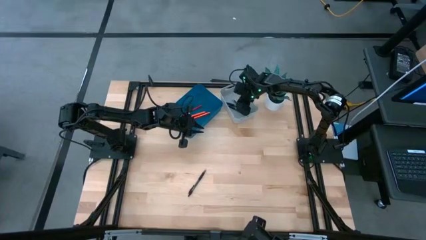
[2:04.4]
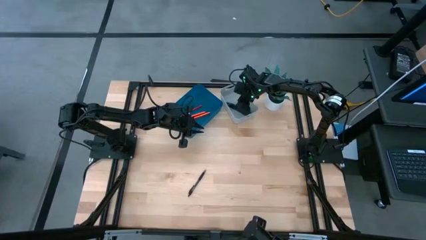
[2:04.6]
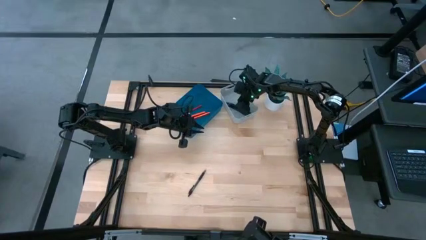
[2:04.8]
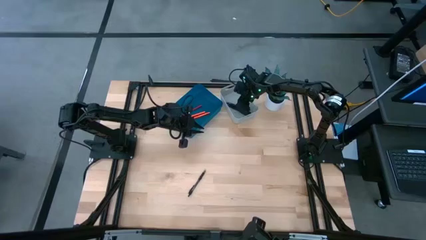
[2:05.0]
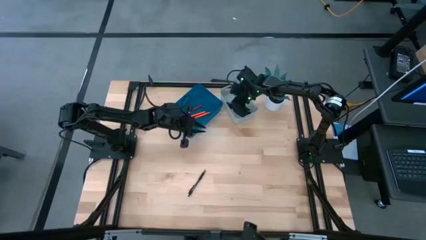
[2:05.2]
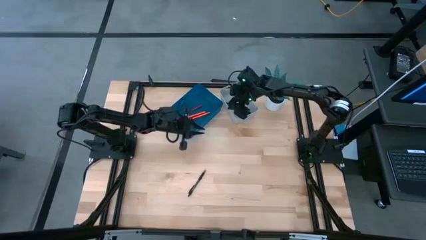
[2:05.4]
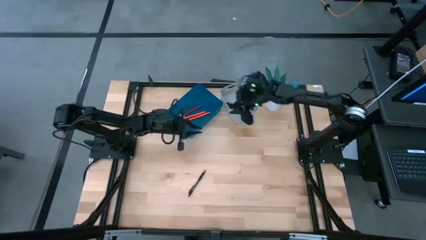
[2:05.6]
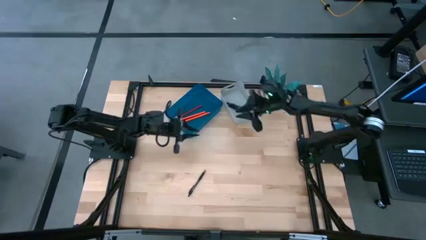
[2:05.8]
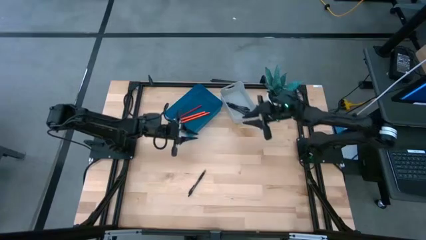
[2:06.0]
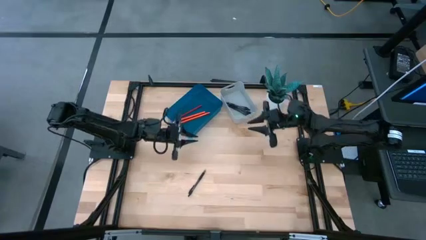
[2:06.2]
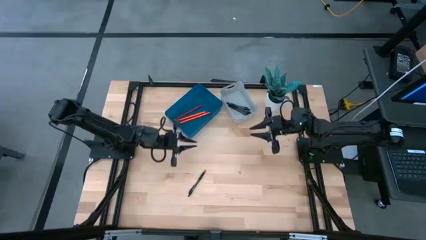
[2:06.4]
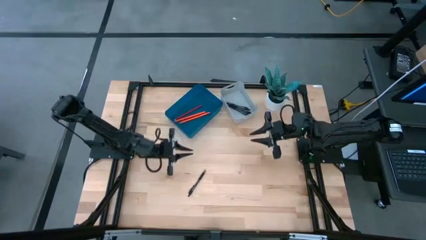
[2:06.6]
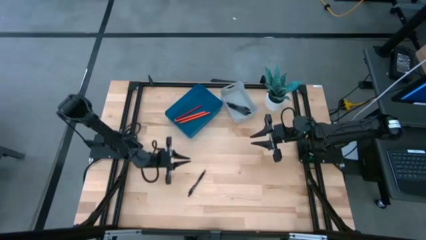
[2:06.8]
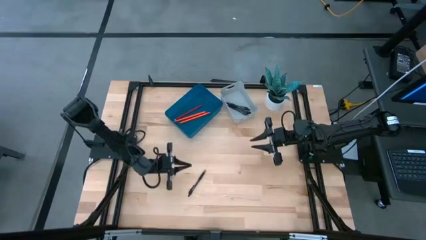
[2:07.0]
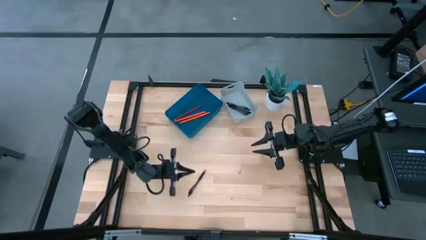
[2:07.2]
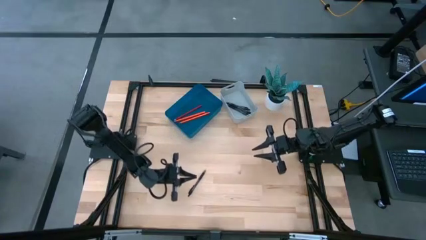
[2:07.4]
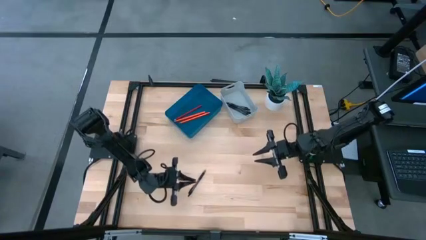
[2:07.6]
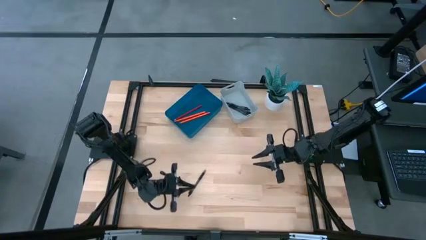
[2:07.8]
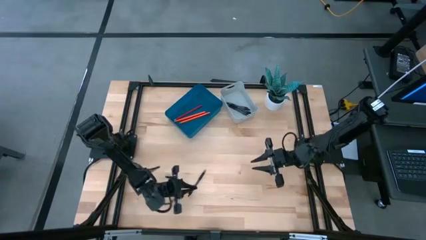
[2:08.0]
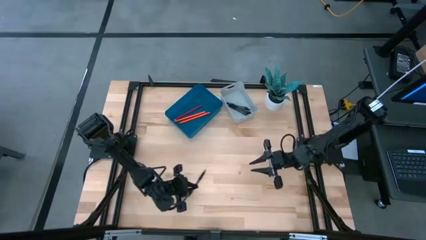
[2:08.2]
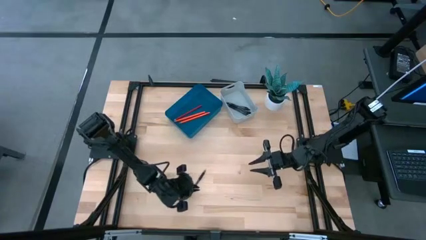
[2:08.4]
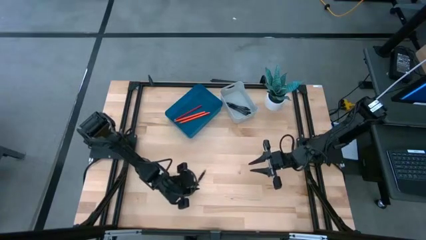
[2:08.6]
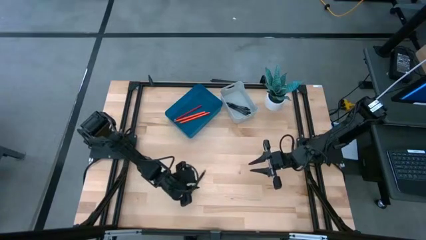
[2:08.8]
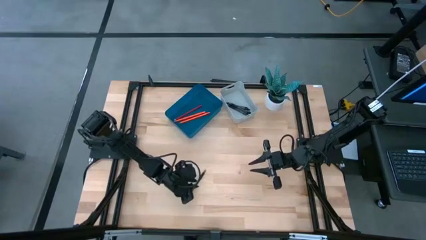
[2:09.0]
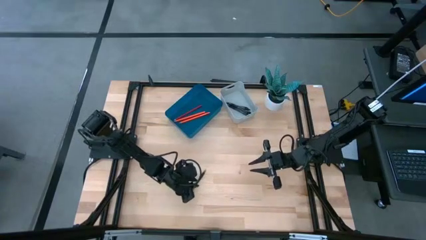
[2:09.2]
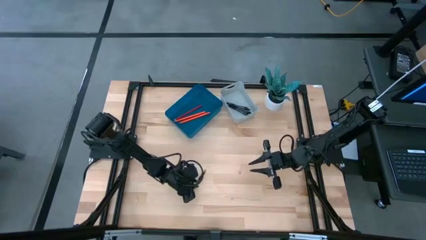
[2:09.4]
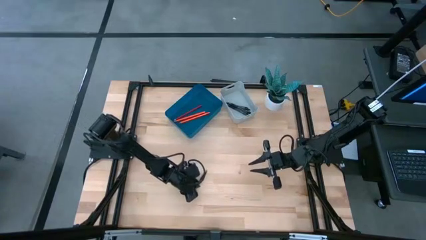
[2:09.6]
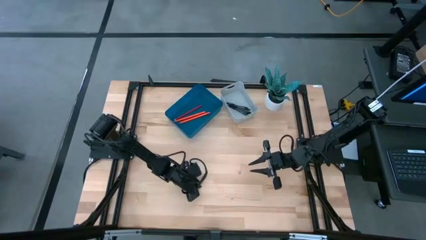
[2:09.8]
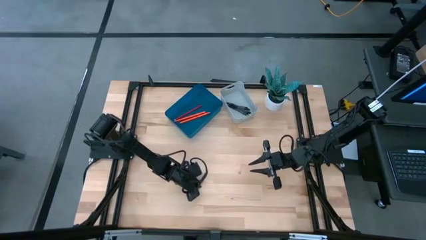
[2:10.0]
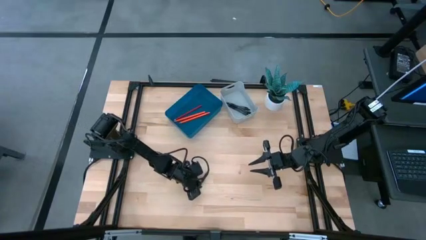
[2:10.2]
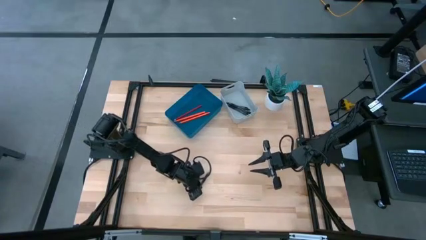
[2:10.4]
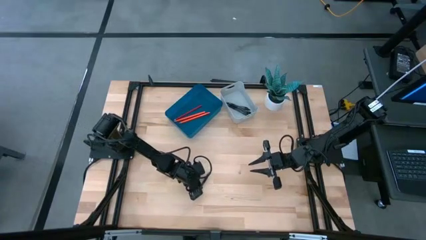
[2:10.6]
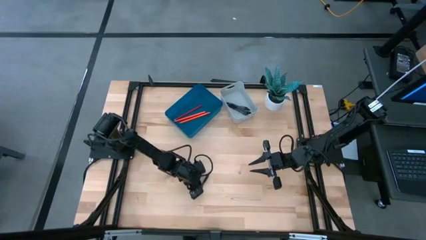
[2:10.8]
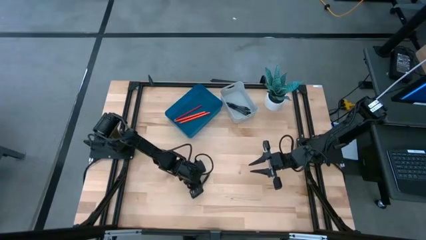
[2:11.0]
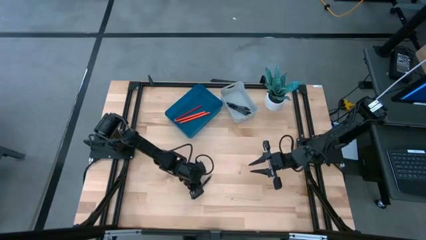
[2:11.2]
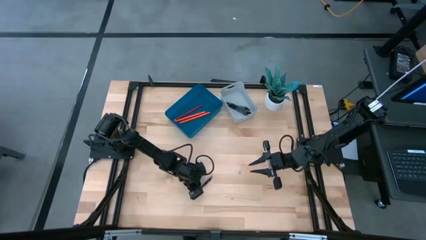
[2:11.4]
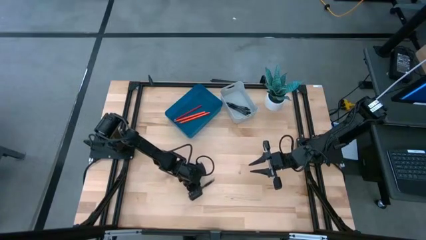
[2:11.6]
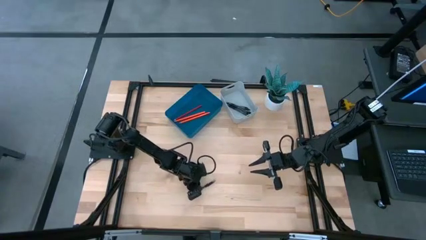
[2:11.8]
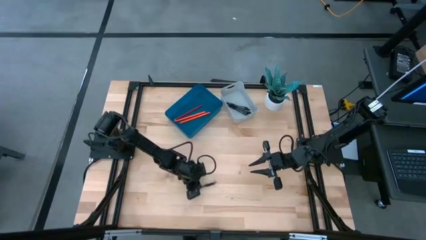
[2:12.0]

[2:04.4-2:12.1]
Task: Sort pens & pencils
Put the black pen into the gray bin

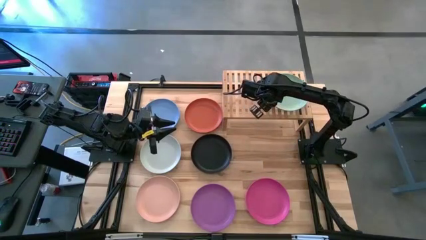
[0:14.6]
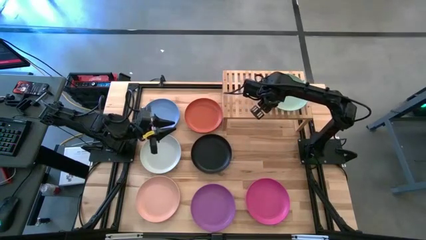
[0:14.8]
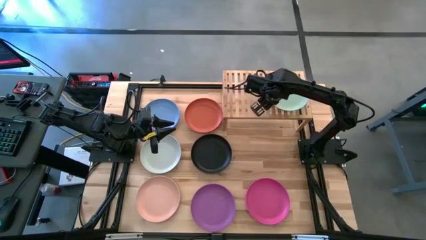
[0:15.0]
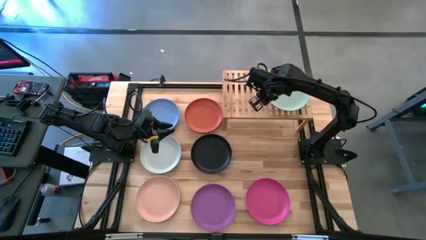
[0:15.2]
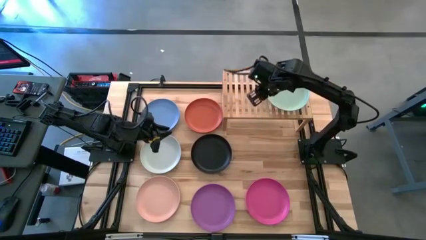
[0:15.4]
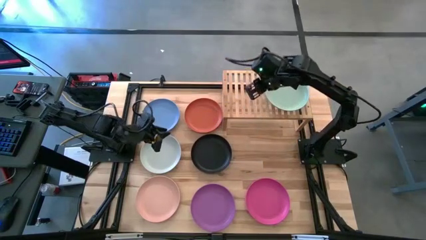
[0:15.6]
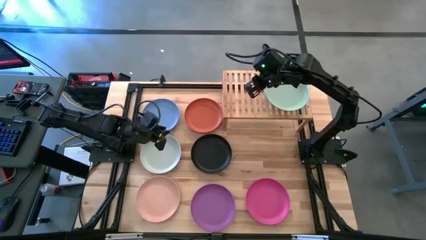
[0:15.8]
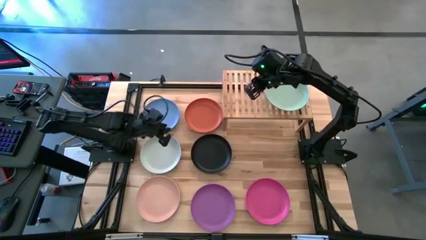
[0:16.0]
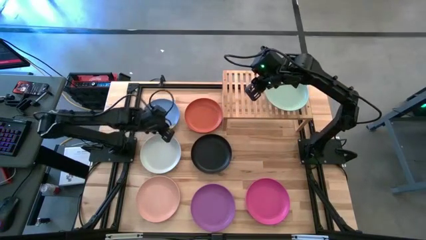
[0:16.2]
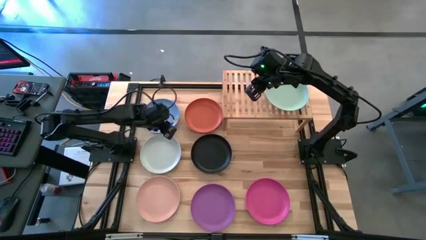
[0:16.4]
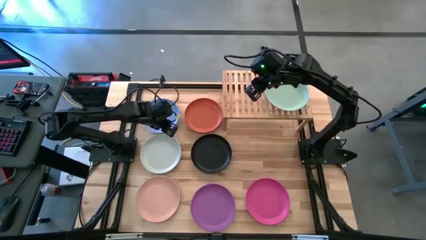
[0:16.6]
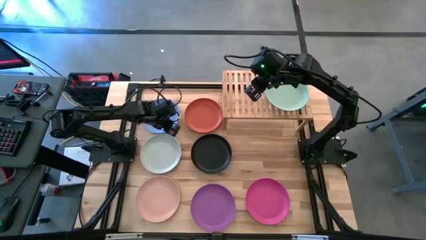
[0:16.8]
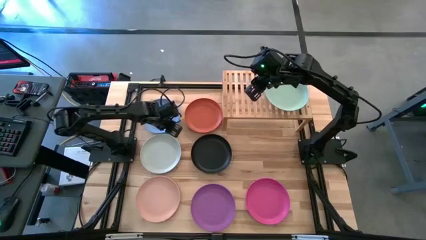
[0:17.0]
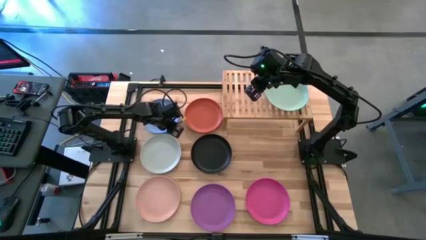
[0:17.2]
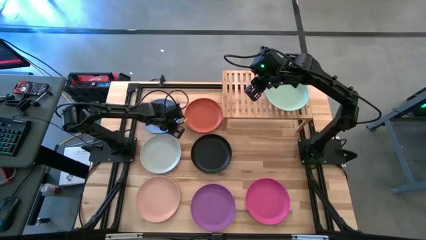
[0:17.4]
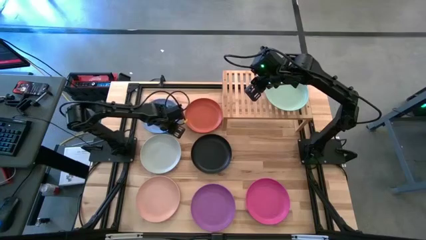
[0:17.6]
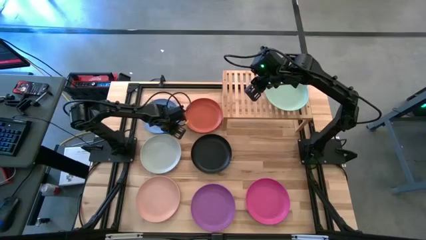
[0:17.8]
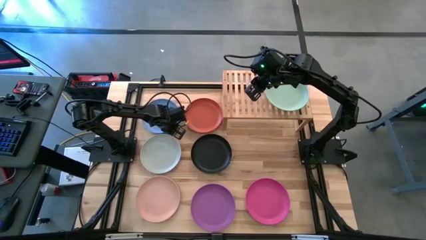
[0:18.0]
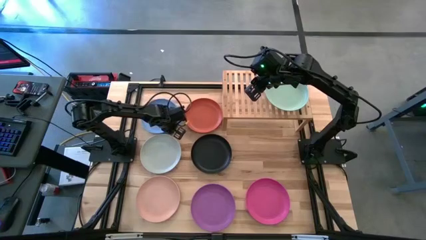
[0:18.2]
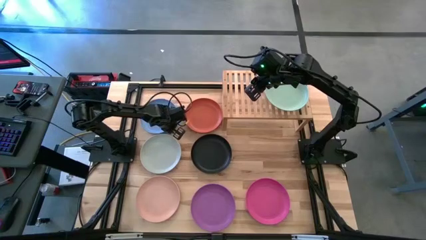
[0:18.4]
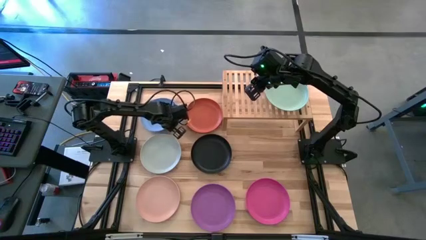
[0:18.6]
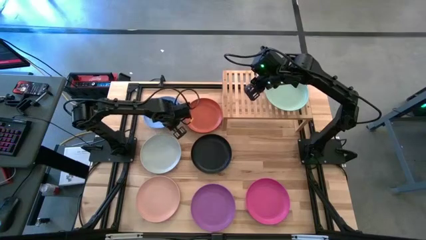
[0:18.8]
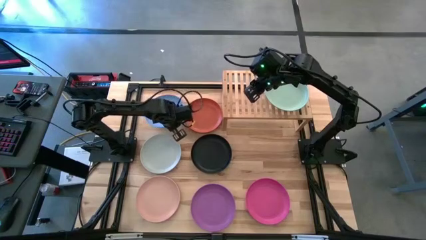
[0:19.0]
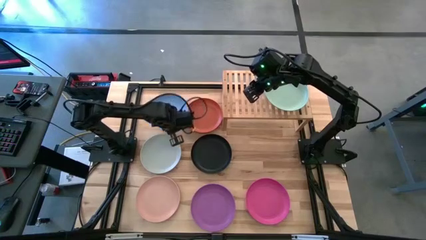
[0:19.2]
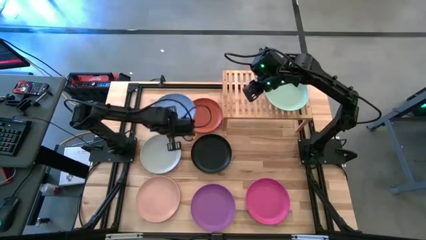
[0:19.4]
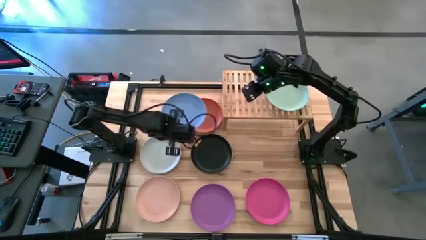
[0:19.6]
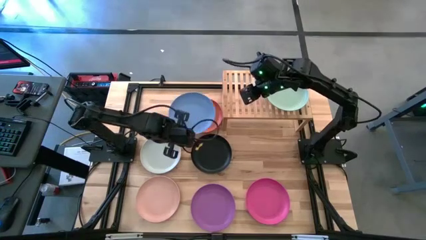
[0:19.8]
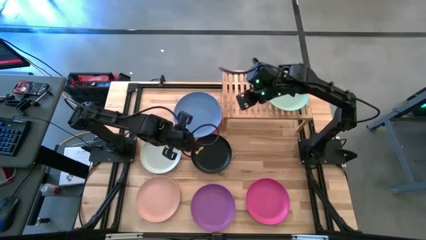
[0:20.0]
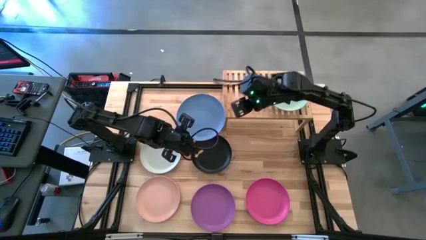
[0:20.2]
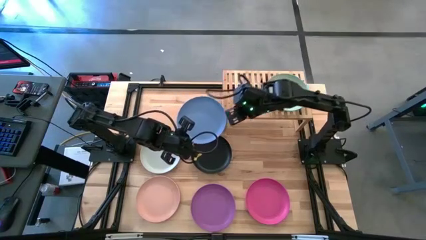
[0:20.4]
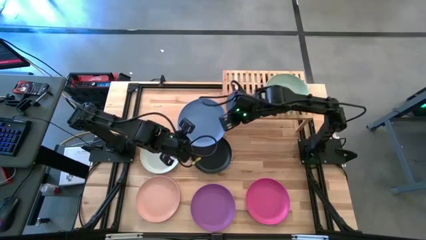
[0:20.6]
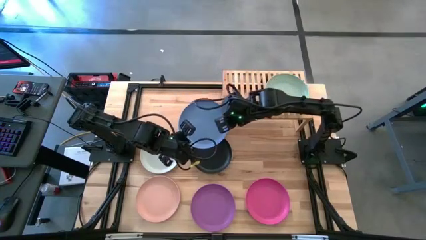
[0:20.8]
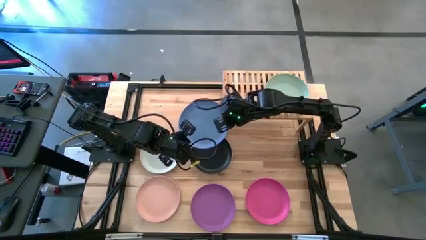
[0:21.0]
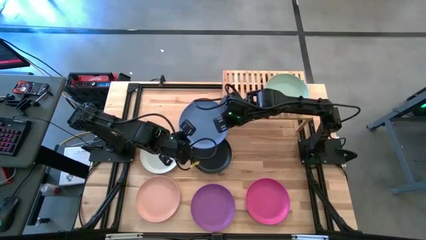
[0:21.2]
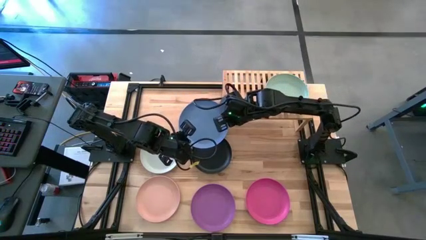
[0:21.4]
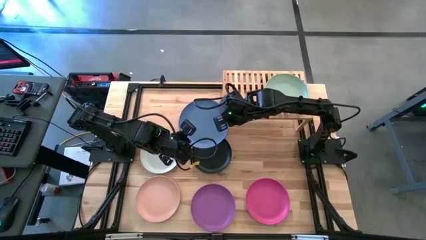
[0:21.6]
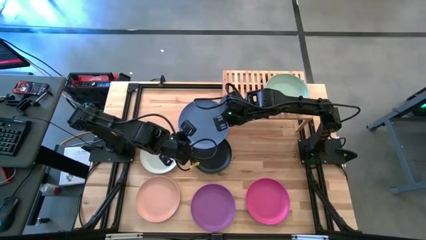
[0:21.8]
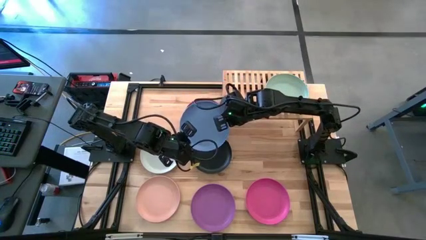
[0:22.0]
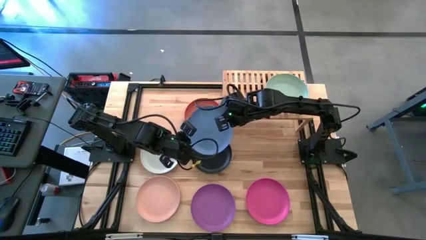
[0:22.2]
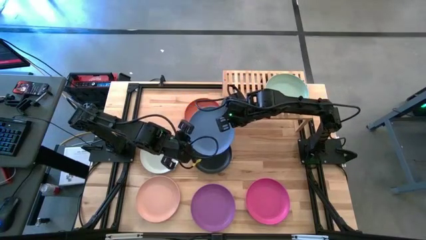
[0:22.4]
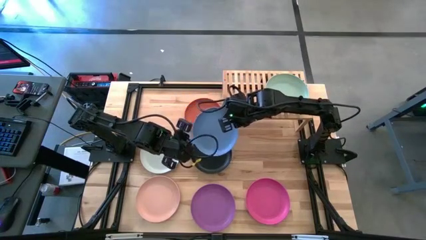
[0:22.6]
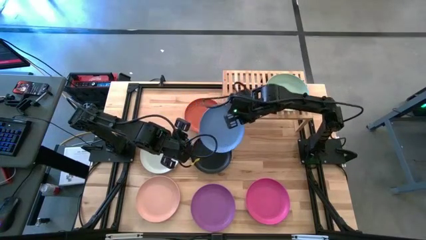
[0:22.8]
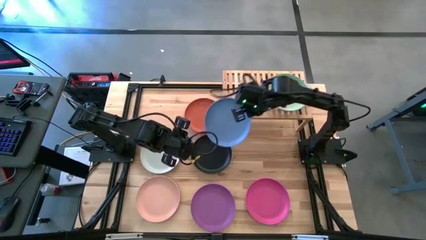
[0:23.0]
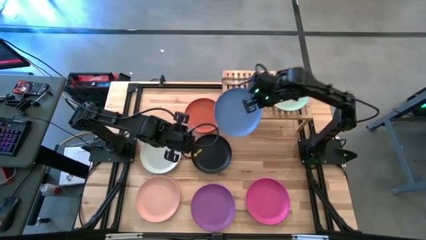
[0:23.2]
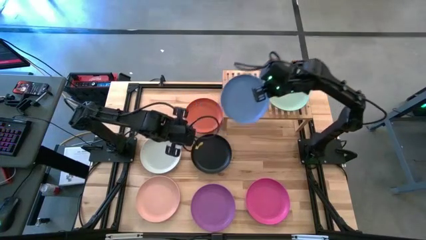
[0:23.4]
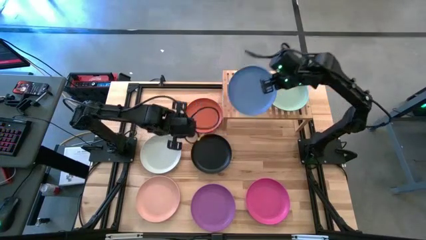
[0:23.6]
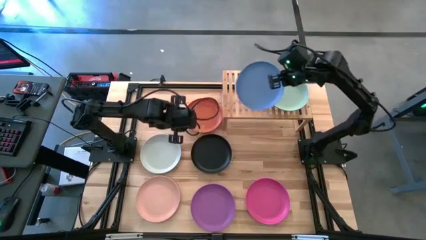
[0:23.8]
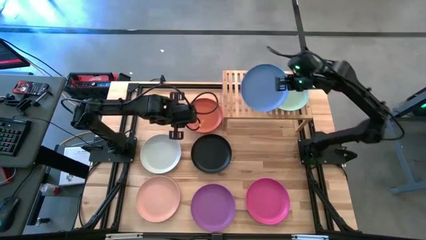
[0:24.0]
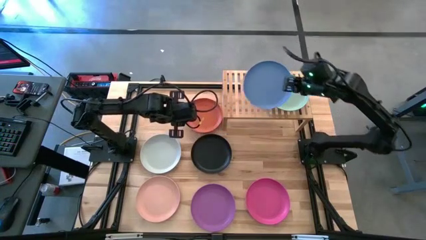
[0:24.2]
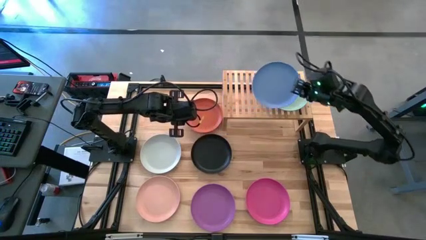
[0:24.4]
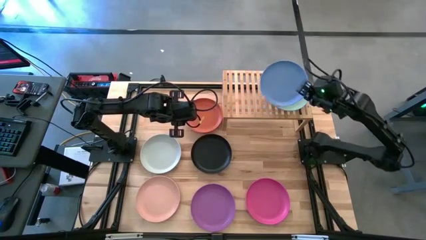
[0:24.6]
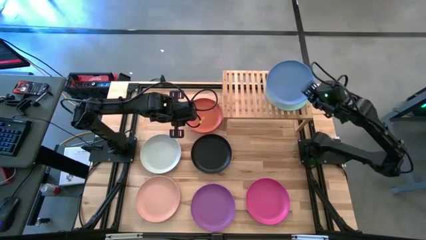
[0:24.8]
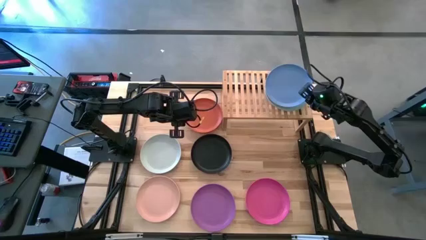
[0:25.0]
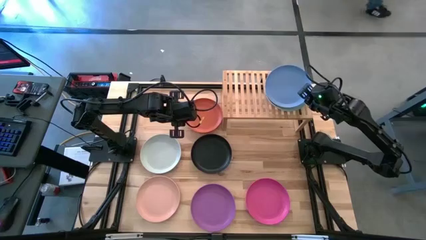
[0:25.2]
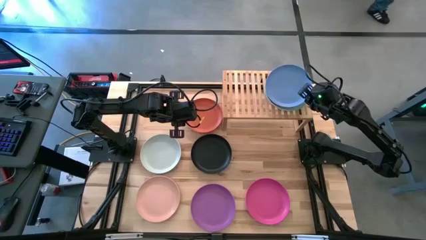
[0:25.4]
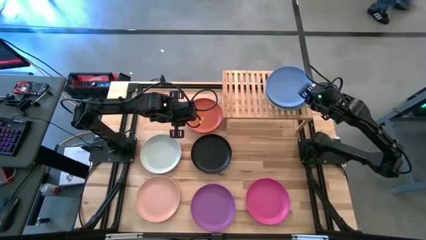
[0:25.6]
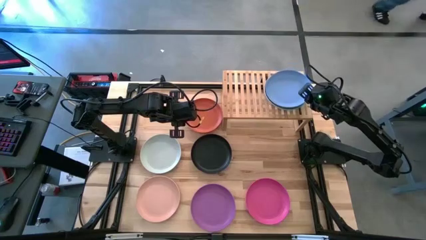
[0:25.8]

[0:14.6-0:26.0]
Task: Place and stack plates onto a shelf
Stack the blue plate on top of the green plate on the shelf
